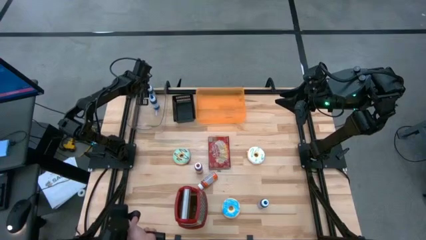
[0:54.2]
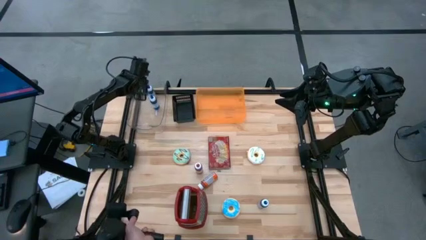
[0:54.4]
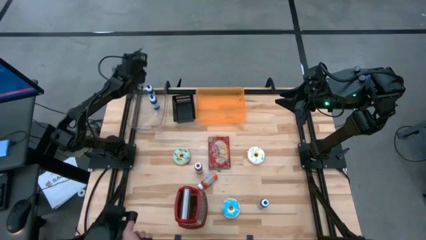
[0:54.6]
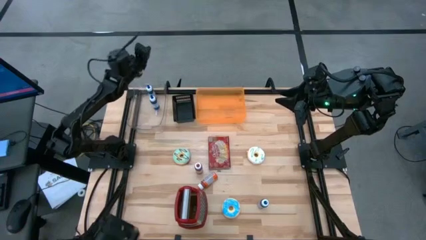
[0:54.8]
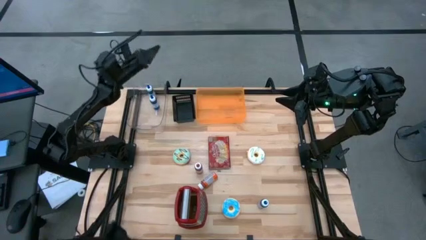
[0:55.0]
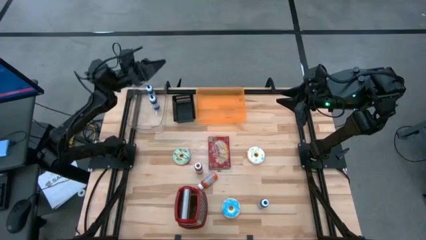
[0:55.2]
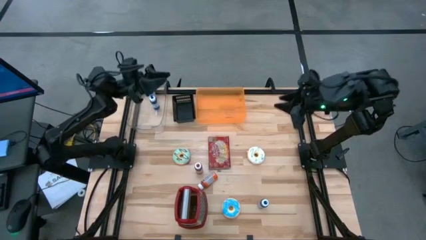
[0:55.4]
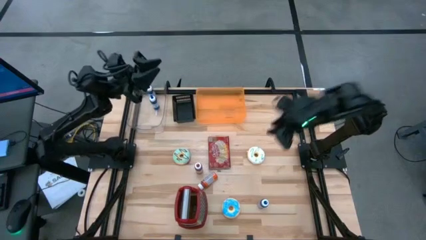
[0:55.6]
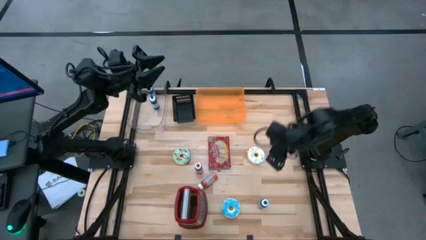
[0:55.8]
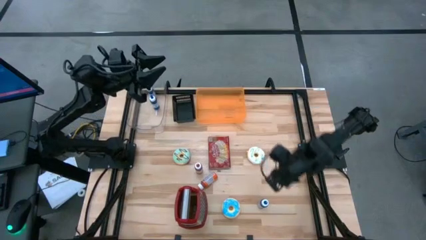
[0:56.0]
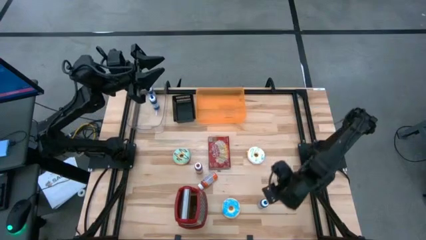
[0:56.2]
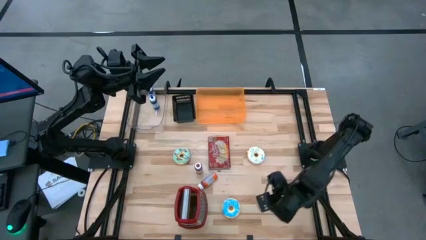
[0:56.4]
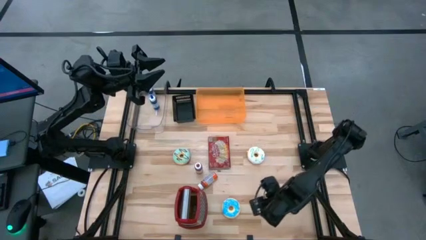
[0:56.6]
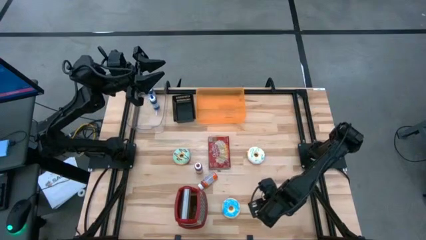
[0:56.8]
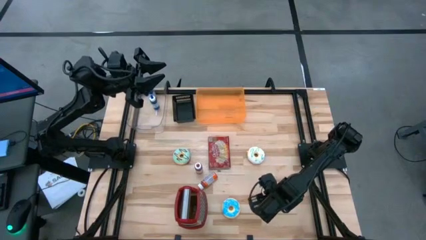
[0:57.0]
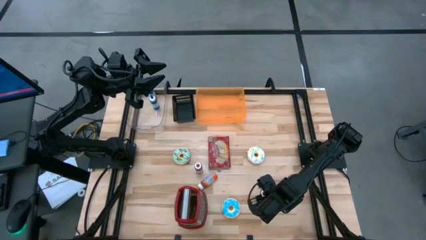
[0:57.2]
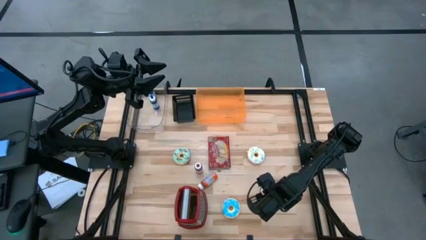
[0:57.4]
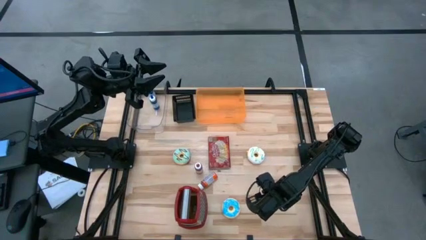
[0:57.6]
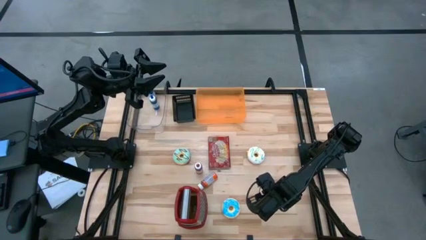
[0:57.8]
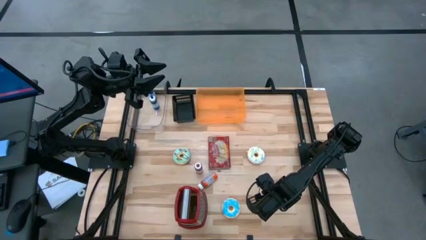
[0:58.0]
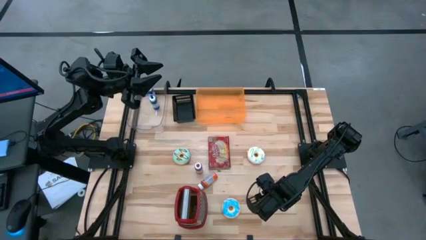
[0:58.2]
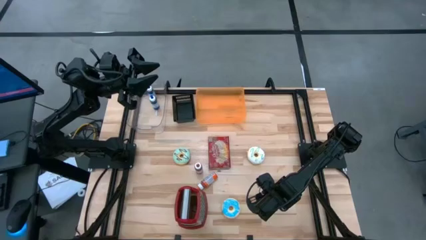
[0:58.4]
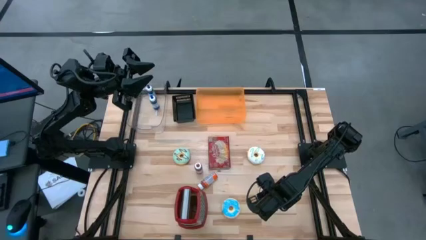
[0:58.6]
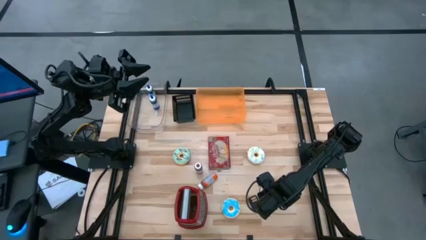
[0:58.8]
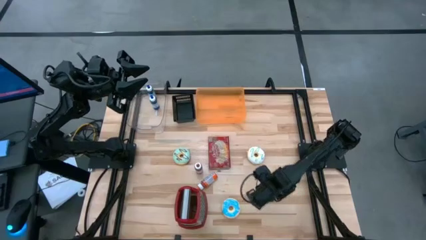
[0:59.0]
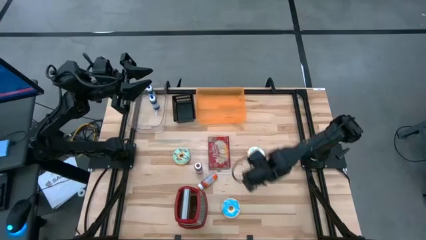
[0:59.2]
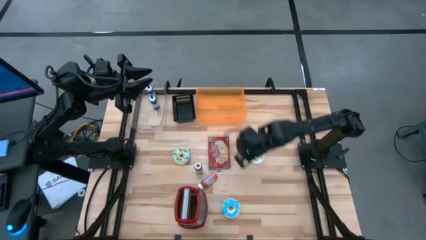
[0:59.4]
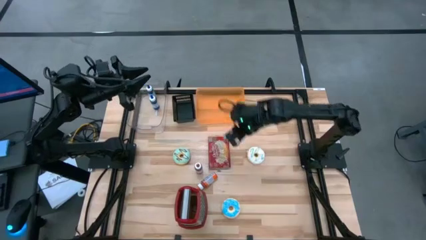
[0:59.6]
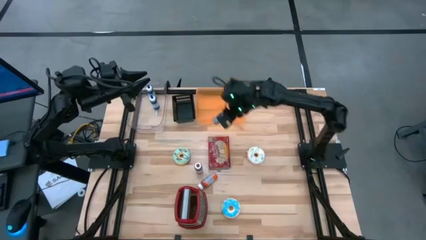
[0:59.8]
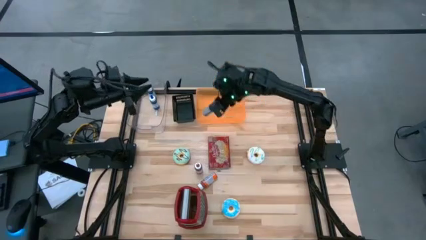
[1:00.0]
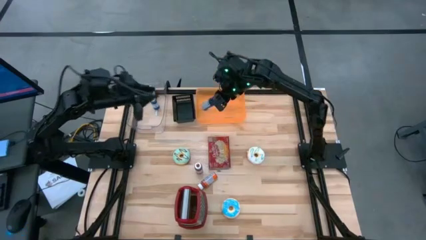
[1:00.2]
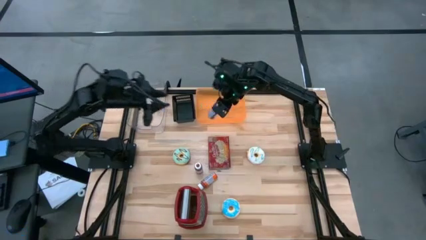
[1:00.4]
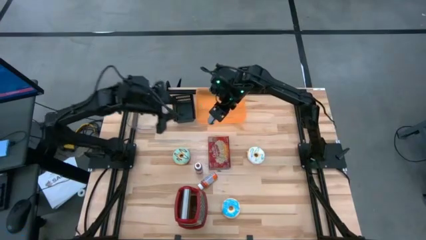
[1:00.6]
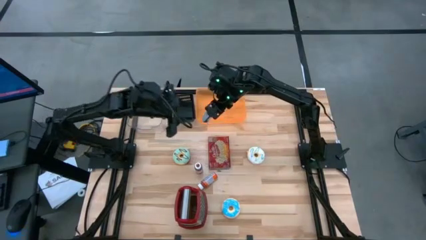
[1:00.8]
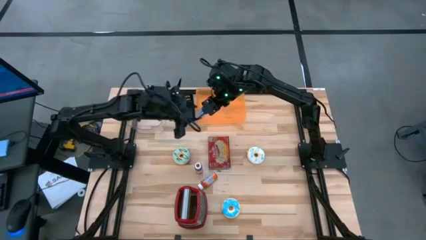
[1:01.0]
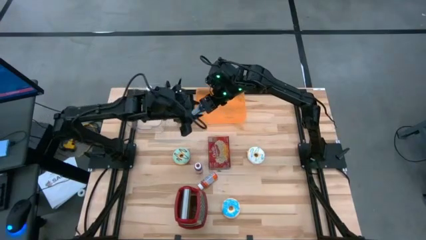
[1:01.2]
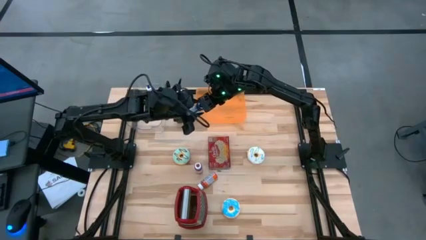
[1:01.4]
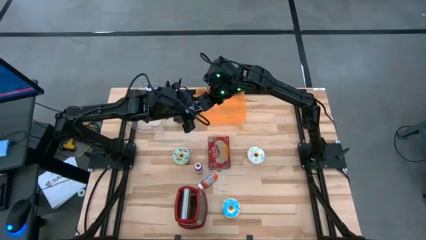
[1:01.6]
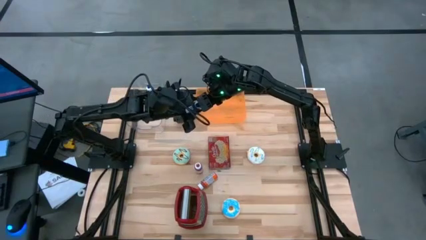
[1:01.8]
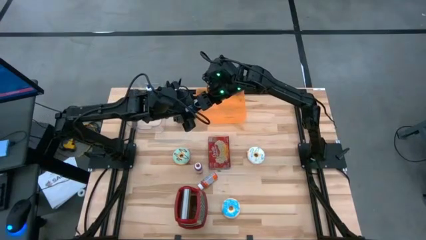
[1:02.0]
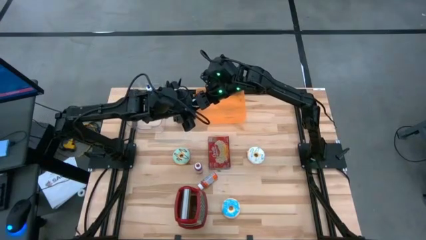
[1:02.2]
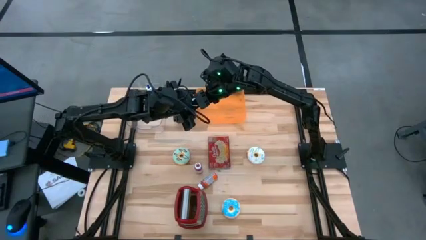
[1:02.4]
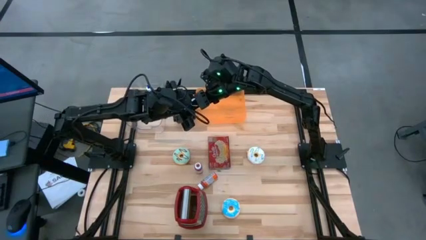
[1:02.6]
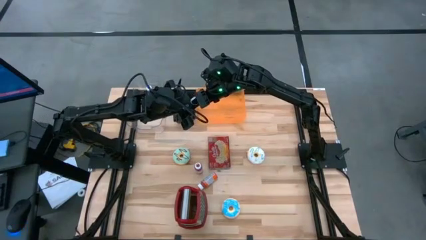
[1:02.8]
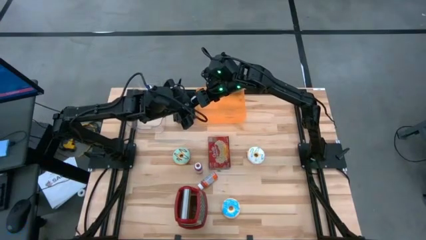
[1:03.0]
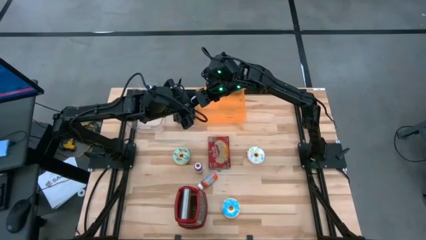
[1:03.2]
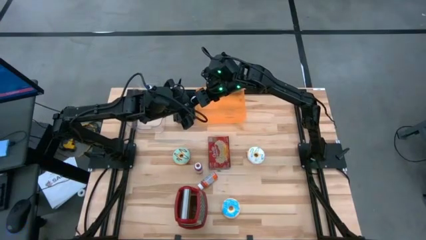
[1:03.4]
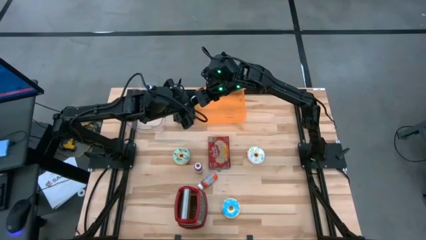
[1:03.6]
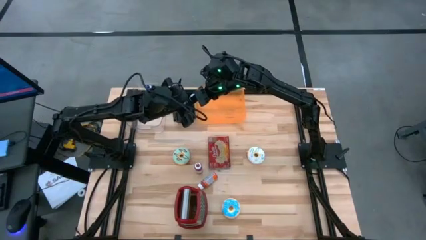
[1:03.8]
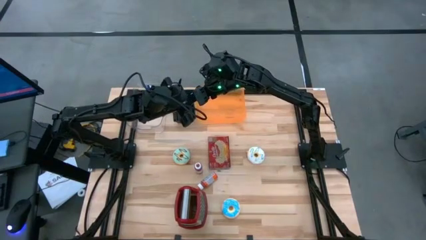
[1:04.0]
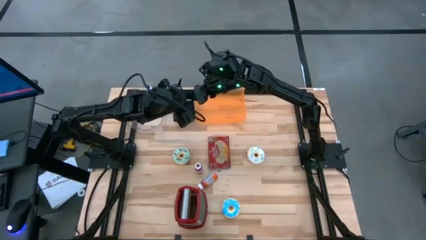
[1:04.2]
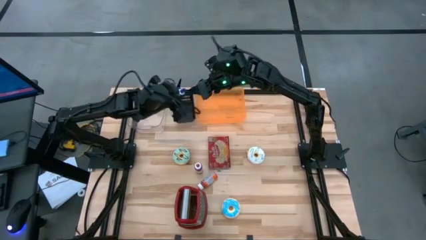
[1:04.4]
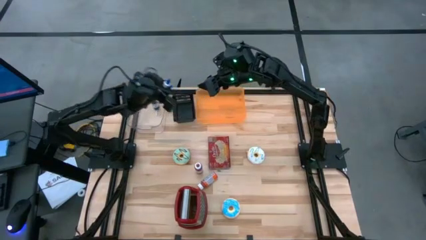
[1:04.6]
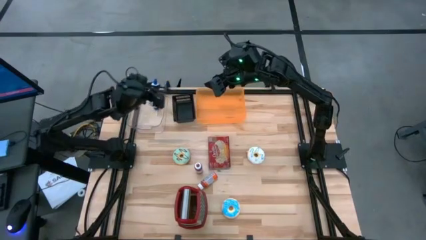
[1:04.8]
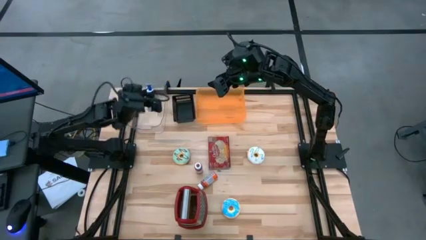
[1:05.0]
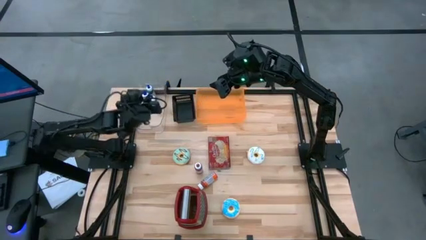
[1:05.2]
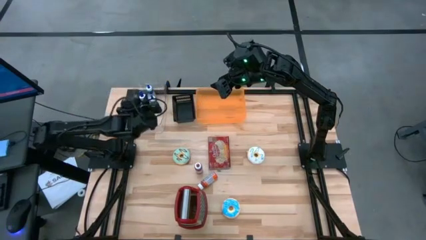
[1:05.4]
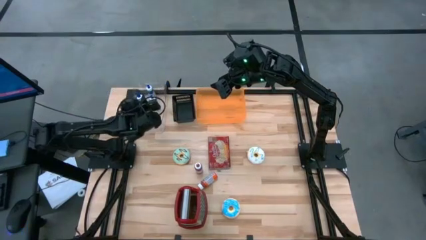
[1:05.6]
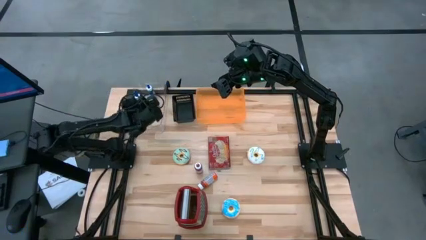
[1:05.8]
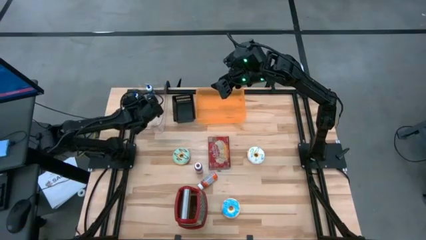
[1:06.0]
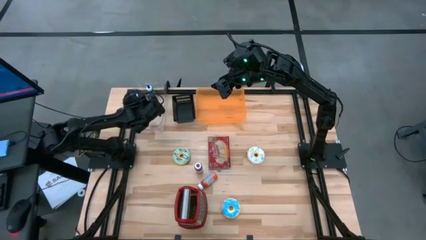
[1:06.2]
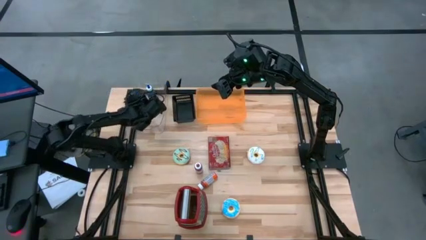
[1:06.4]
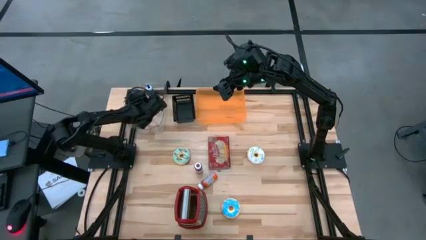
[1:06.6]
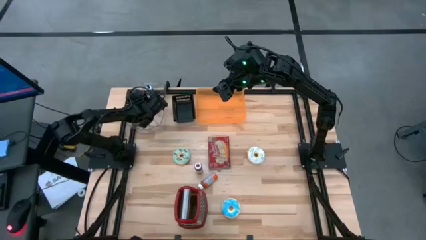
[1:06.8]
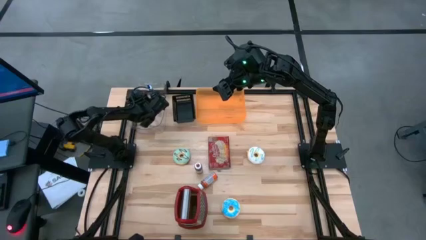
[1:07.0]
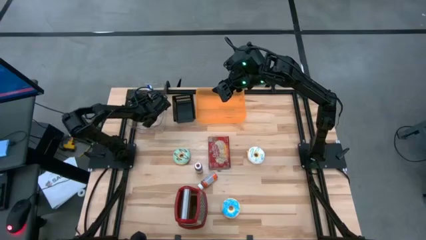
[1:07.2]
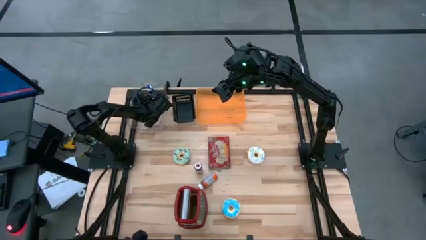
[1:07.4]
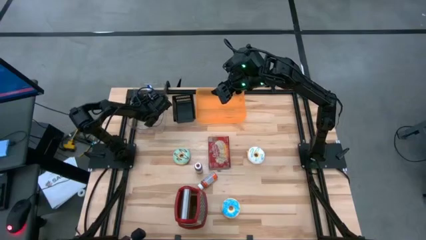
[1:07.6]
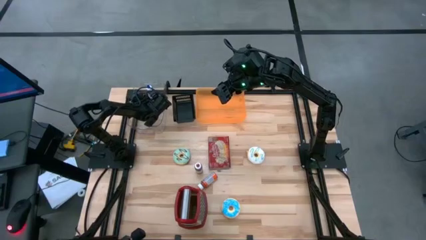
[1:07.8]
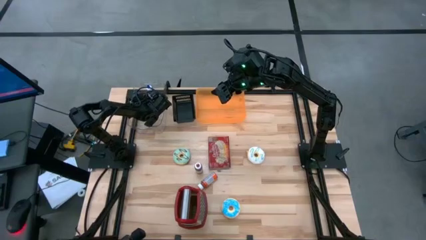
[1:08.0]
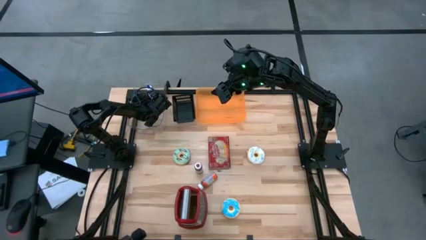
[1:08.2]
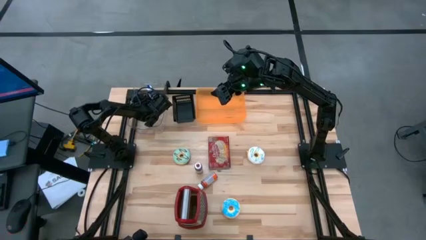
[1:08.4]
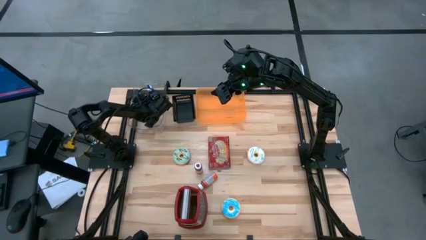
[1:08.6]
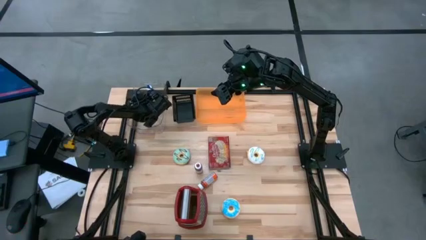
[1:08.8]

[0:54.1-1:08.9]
Put the blue food coloring bottle into the transparent bin
